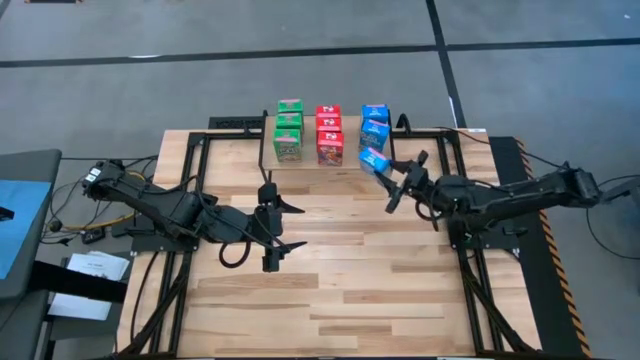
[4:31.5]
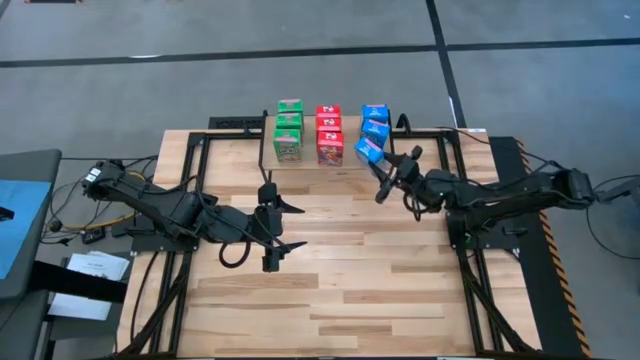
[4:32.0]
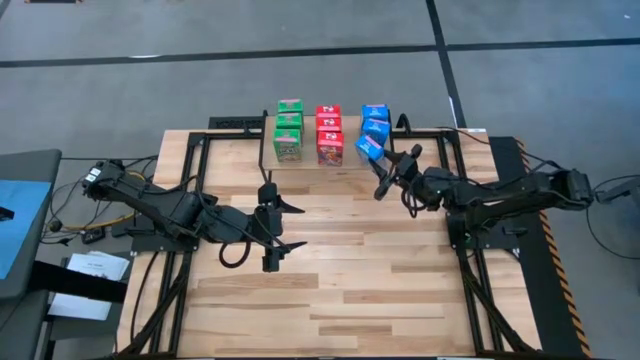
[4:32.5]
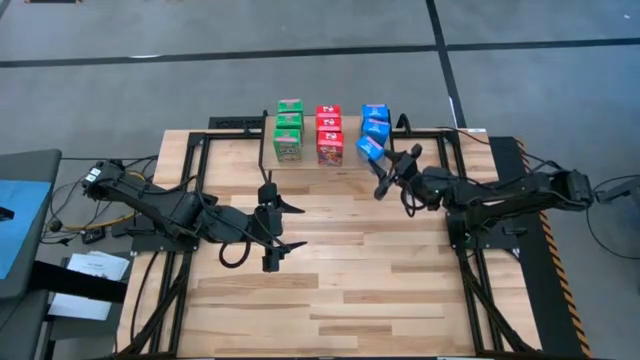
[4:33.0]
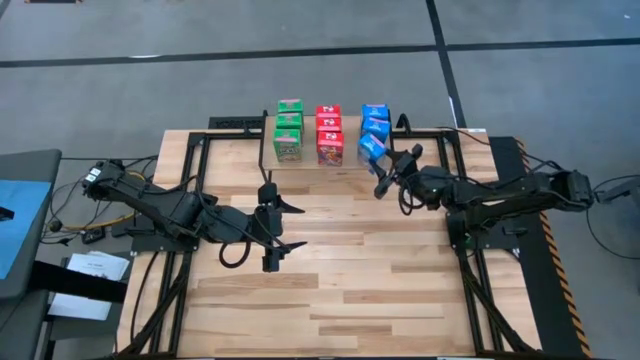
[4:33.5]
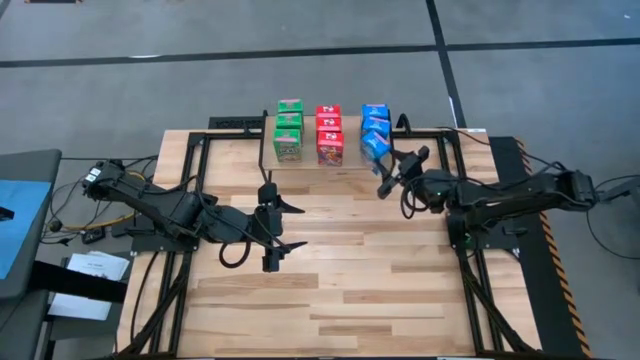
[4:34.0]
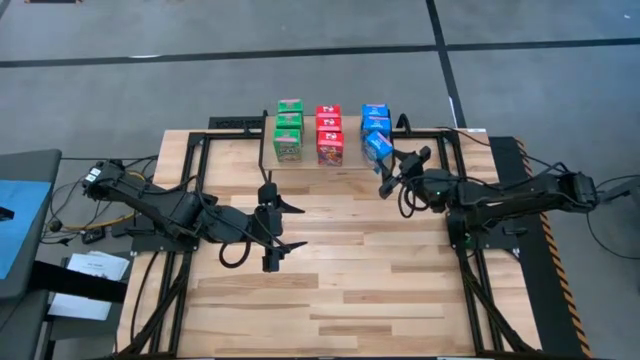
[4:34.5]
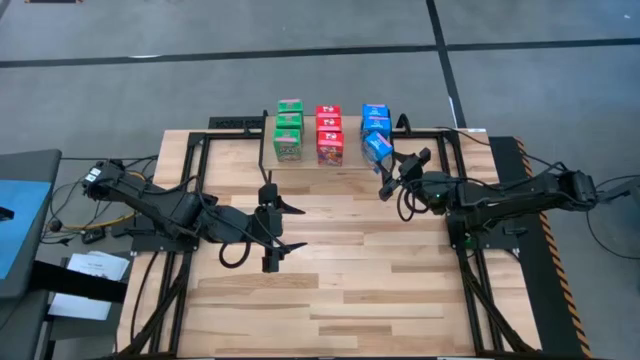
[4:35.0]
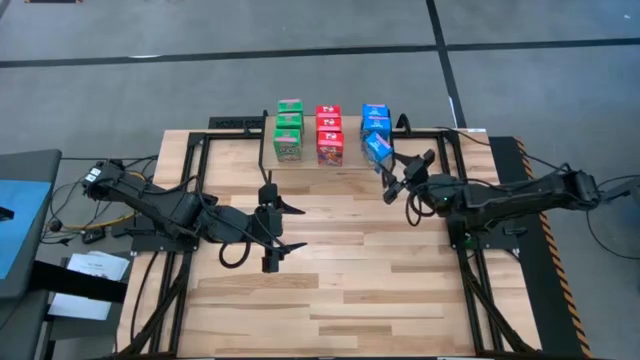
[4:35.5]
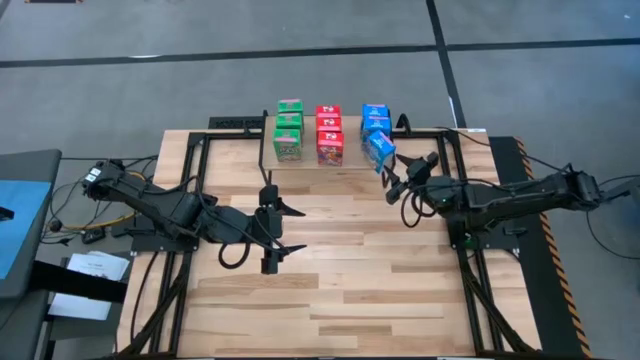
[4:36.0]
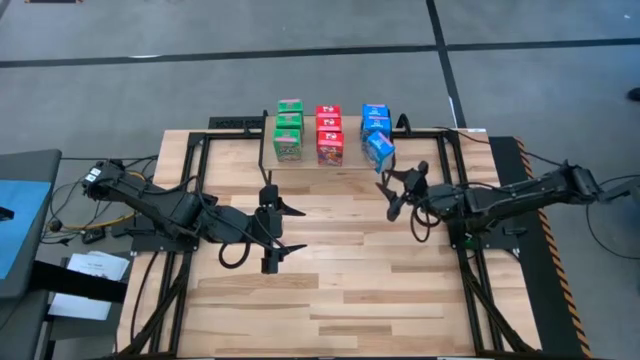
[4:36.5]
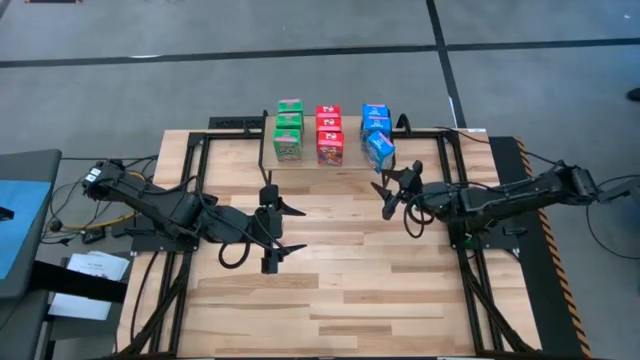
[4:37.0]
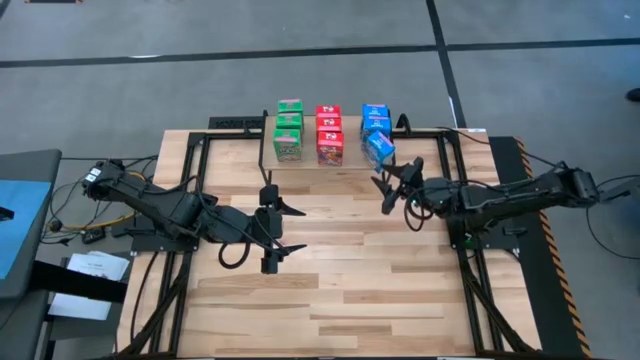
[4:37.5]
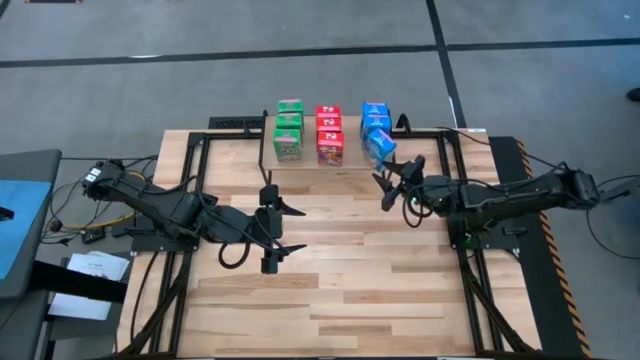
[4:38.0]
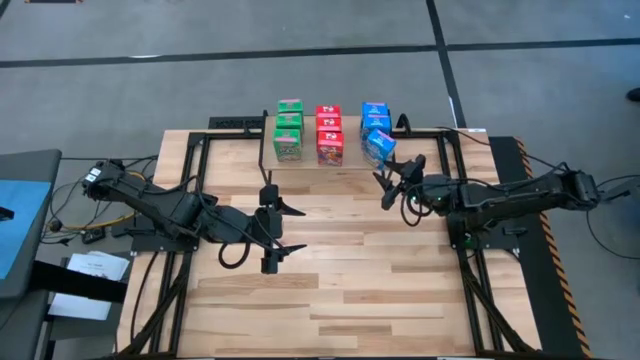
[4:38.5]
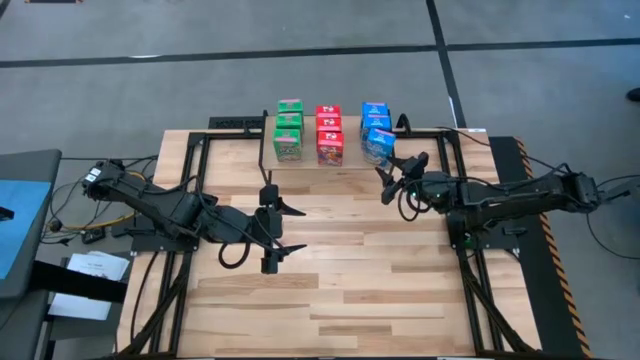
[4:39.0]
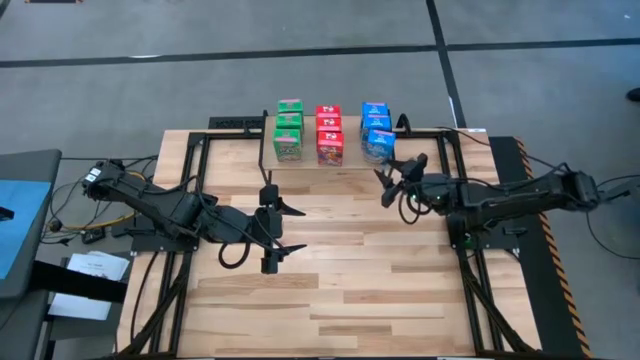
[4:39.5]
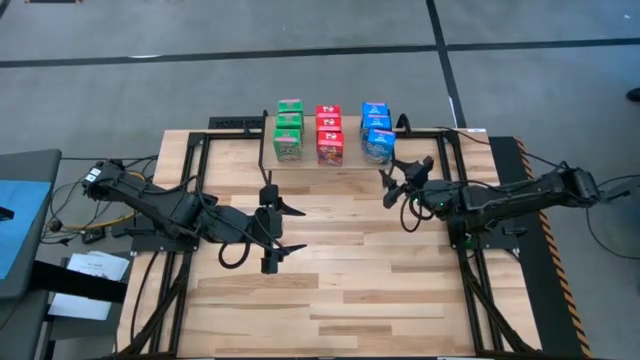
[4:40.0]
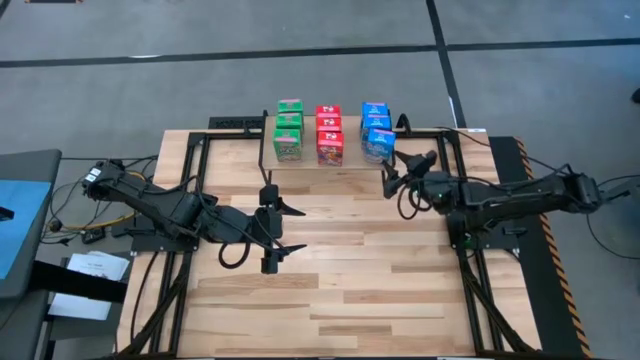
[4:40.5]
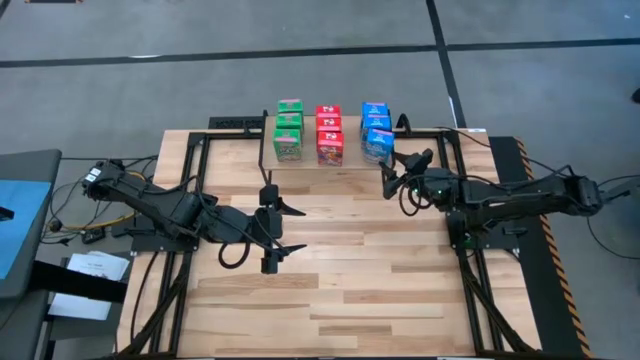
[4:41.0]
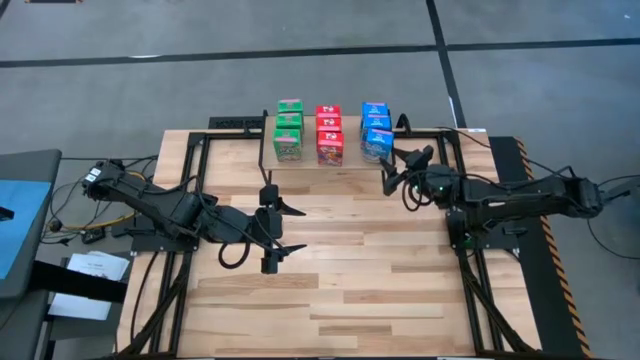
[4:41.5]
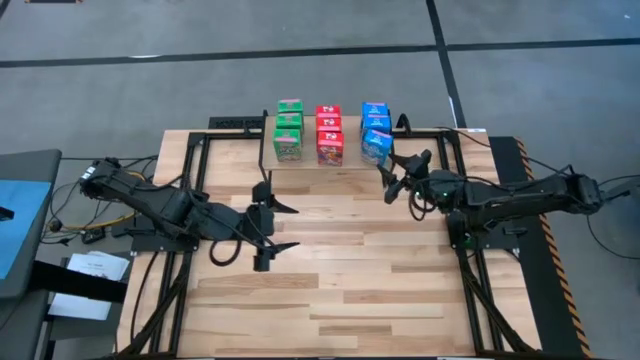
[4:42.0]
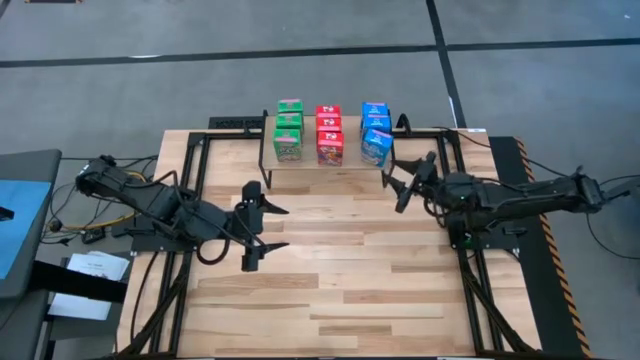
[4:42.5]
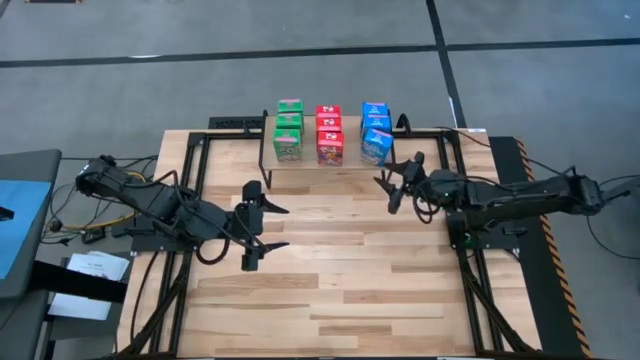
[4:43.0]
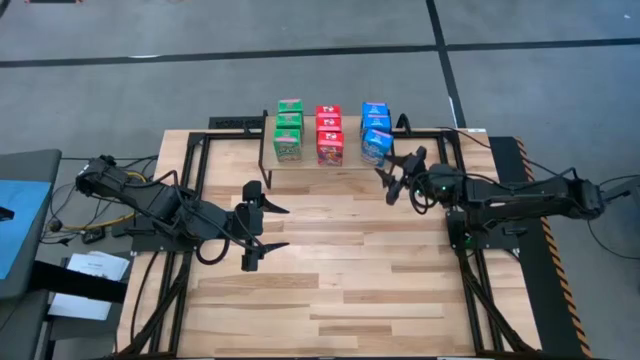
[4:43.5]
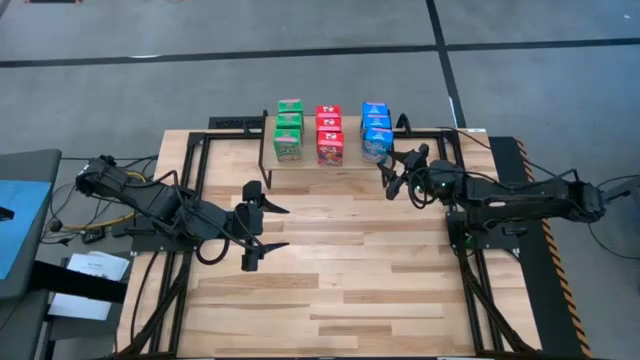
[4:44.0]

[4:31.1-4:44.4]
Task: Stack cereal on shelf
Put the blue cereal box on the shelf aligned with the other blue cereal boxes

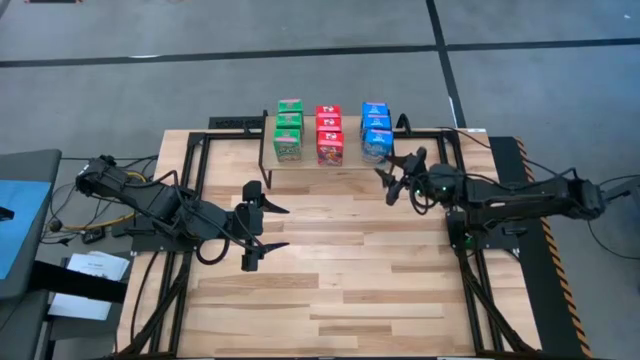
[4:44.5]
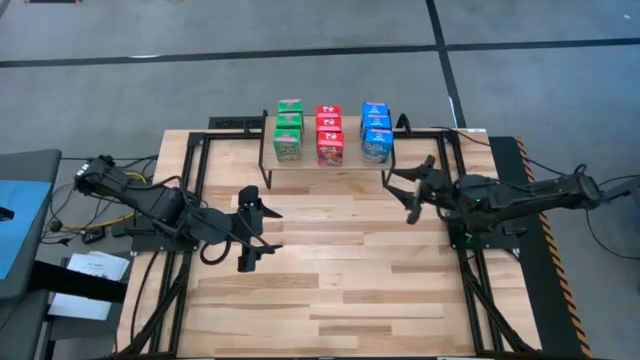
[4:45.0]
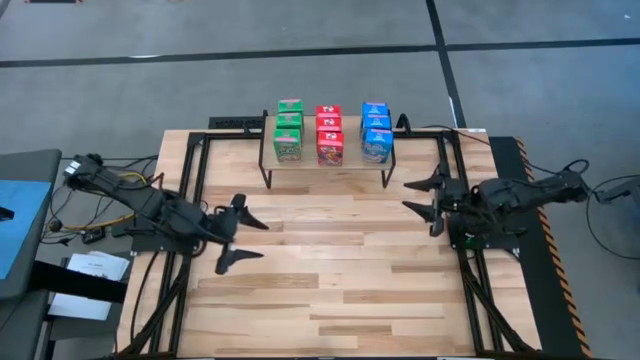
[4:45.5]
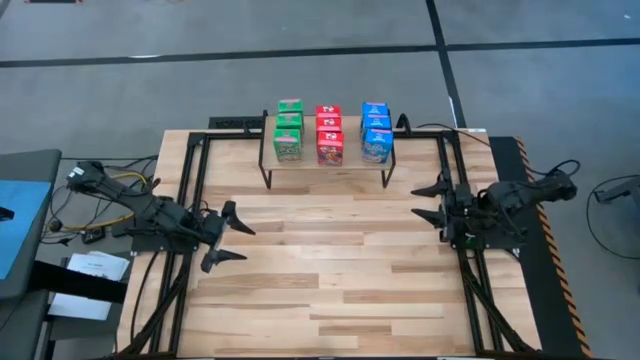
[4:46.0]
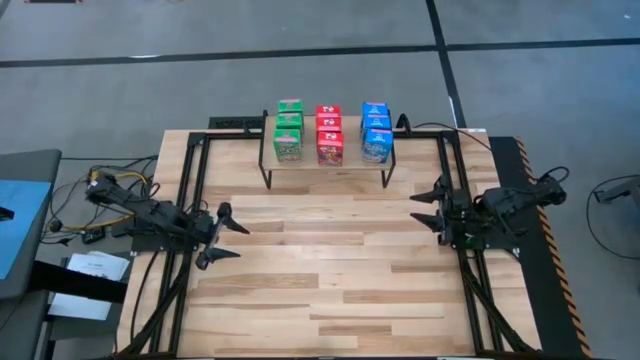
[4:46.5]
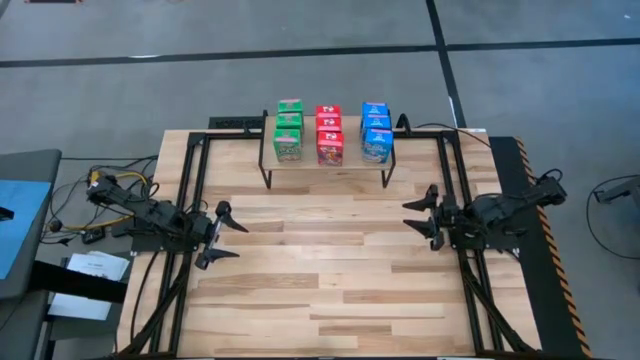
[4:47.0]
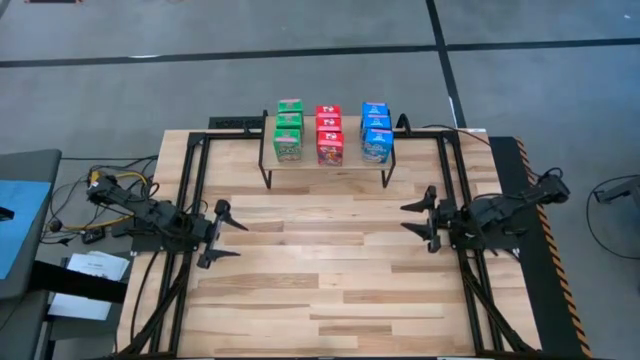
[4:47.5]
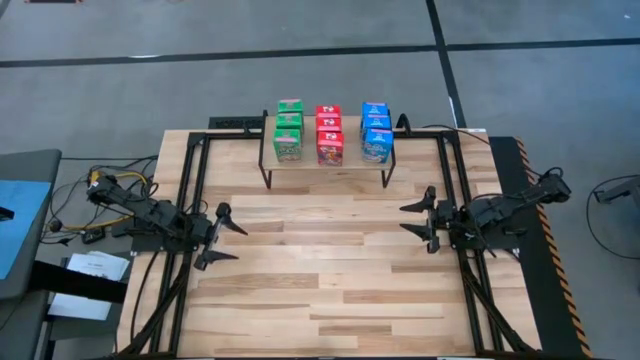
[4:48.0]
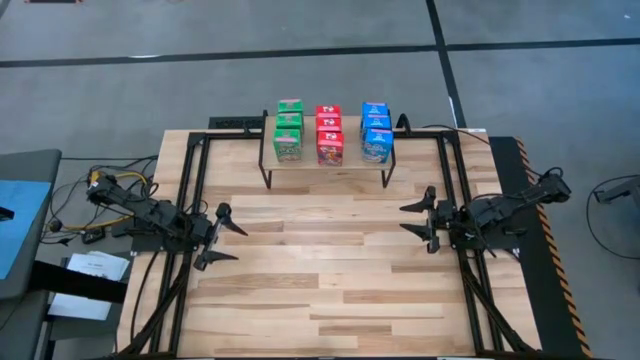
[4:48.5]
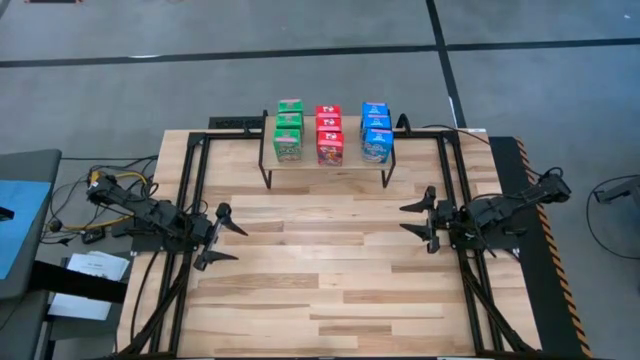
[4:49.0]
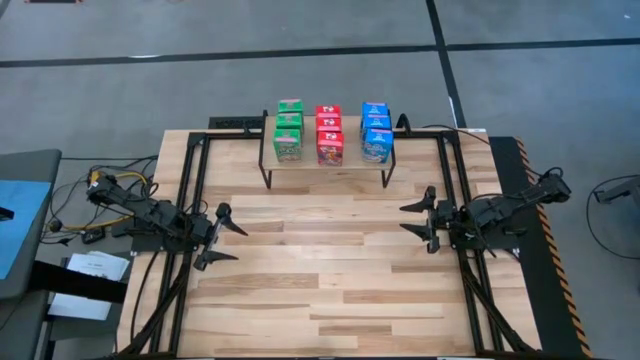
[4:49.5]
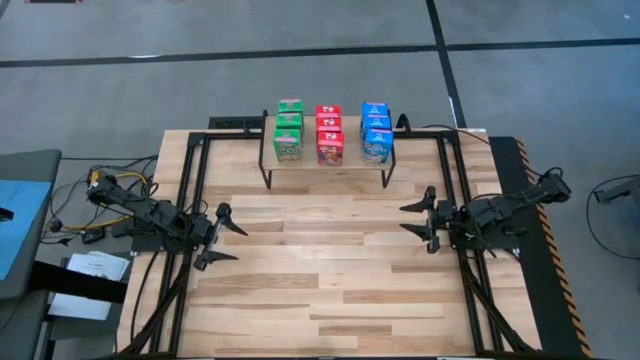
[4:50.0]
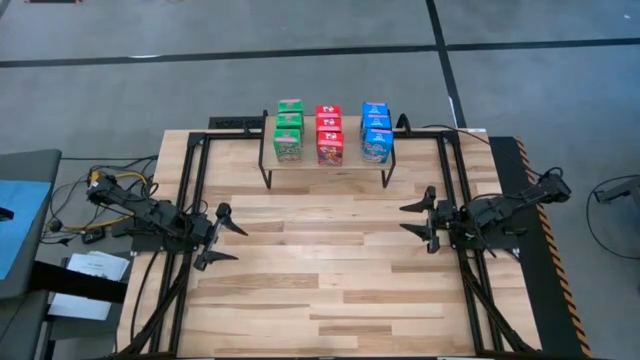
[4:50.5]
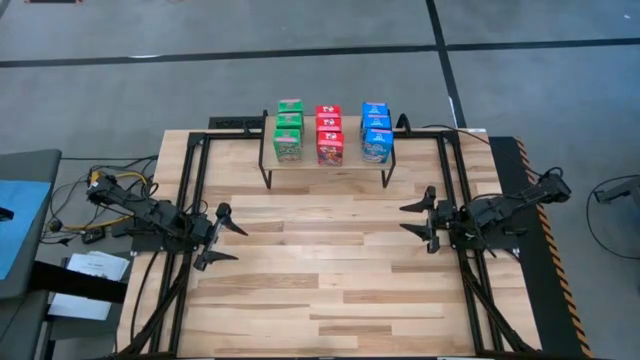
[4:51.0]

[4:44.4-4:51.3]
Return to Home Position

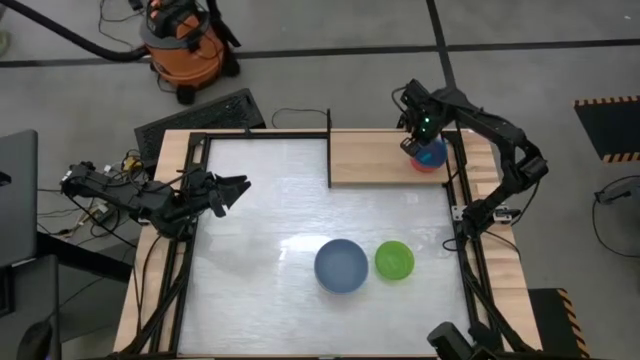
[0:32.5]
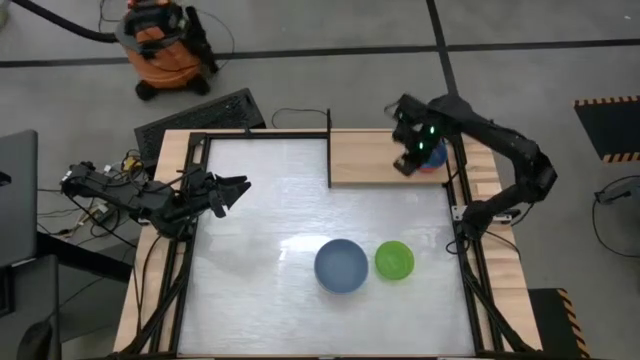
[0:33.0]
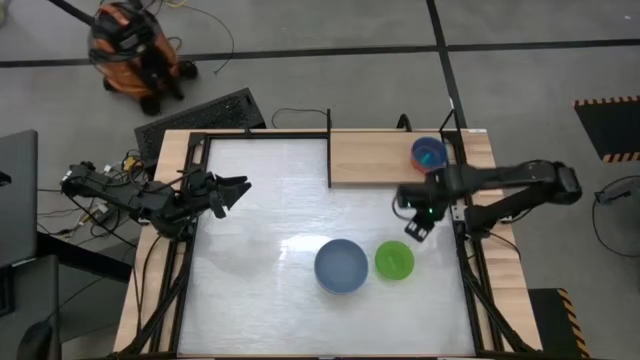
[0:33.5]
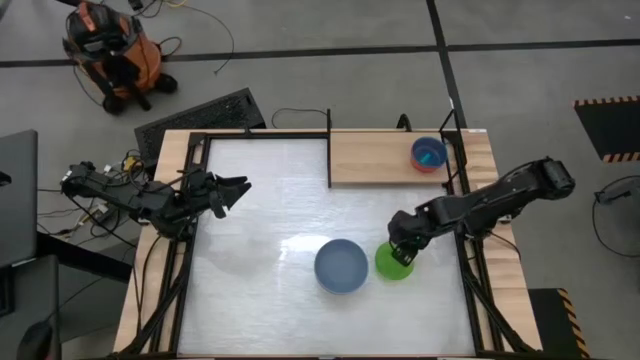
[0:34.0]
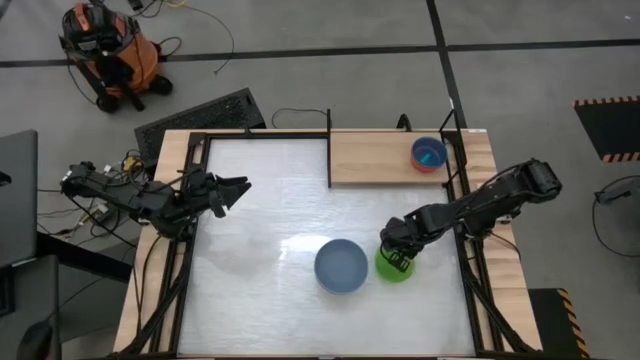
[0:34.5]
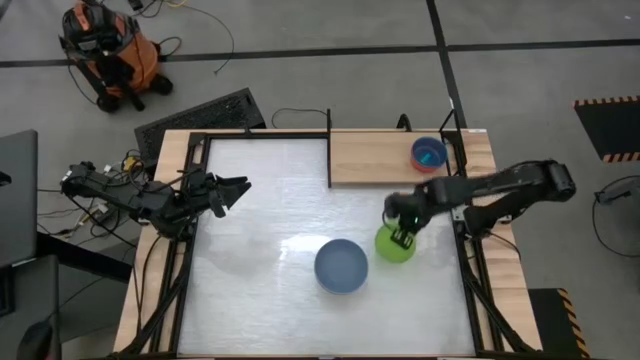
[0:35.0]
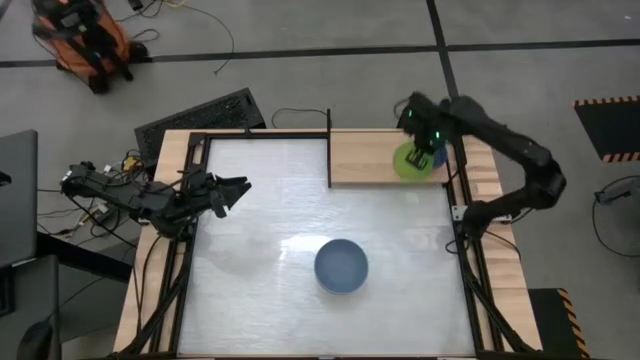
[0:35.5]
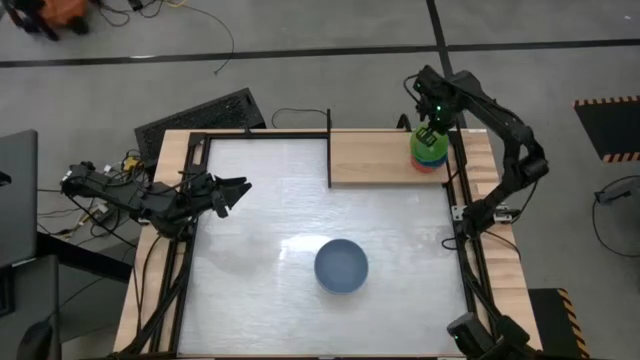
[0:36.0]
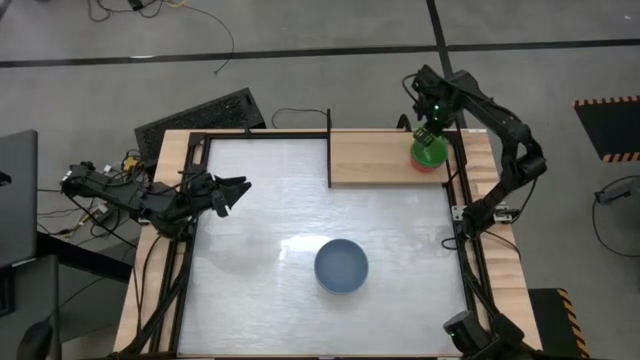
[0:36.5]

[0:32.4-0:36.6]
Task: Place and stack bowls onto a shelf
Stack the green transparent bowl on top of the blue transparent bowl on the shelf
